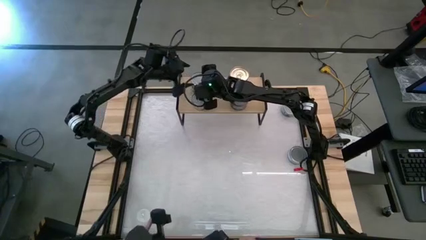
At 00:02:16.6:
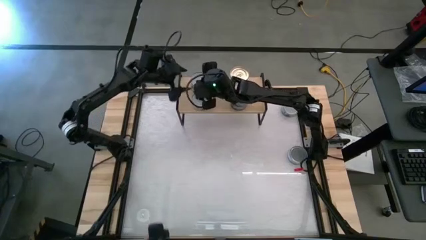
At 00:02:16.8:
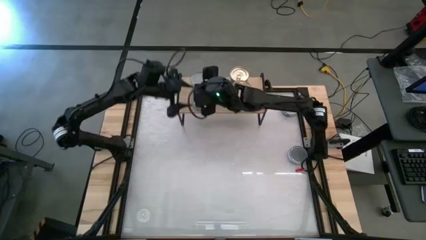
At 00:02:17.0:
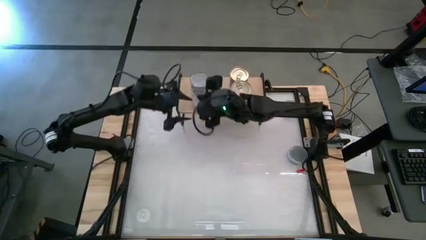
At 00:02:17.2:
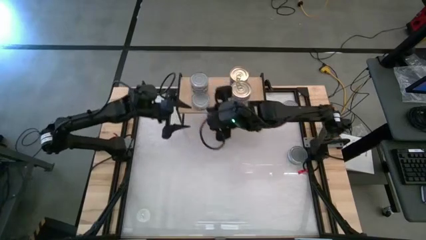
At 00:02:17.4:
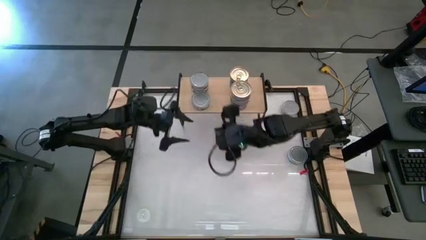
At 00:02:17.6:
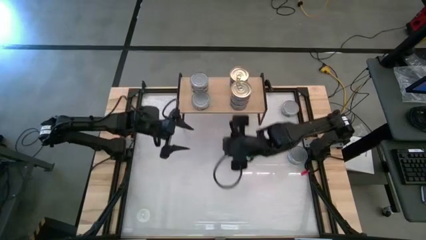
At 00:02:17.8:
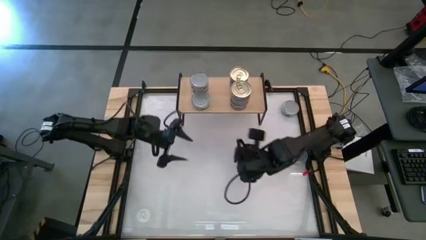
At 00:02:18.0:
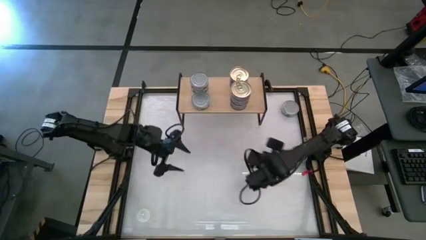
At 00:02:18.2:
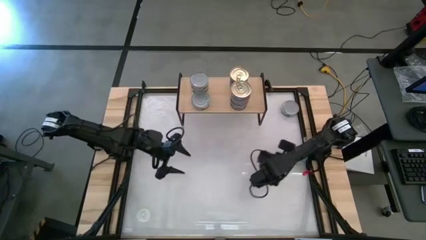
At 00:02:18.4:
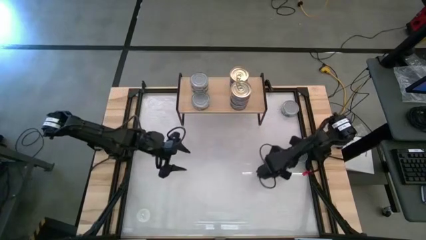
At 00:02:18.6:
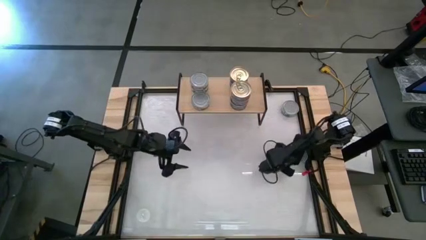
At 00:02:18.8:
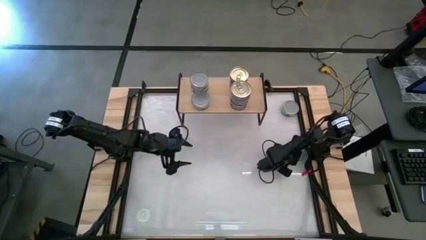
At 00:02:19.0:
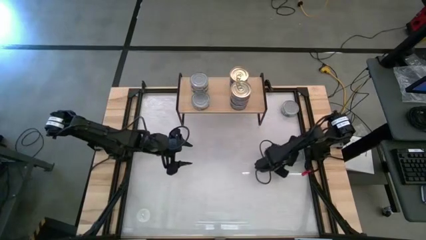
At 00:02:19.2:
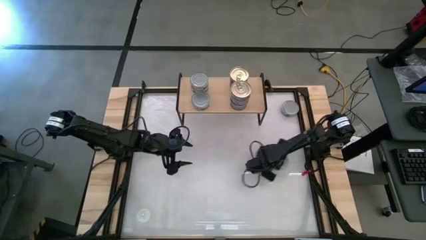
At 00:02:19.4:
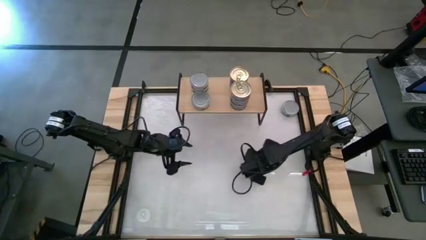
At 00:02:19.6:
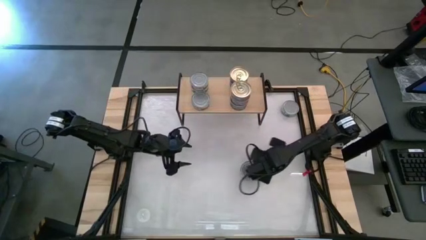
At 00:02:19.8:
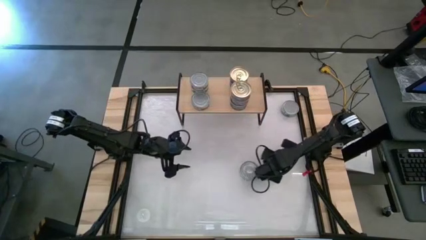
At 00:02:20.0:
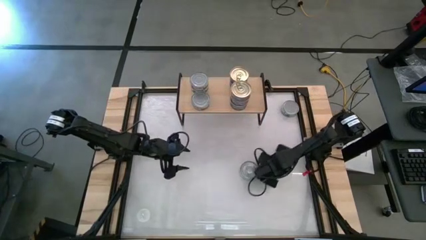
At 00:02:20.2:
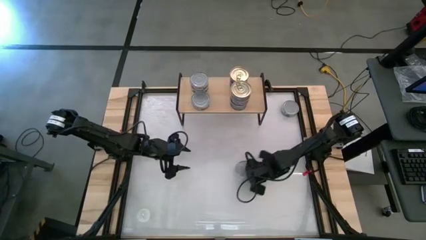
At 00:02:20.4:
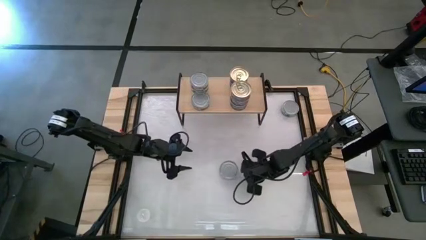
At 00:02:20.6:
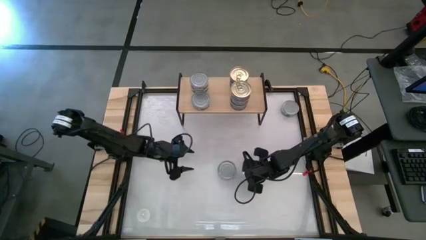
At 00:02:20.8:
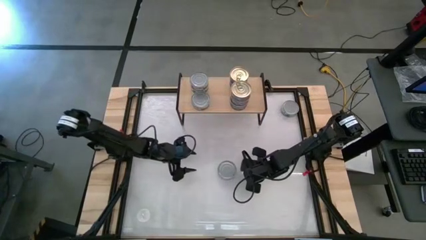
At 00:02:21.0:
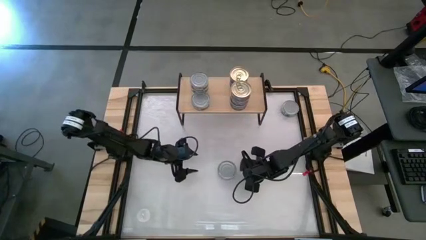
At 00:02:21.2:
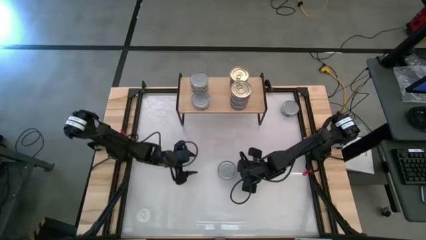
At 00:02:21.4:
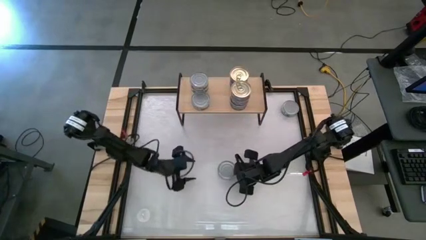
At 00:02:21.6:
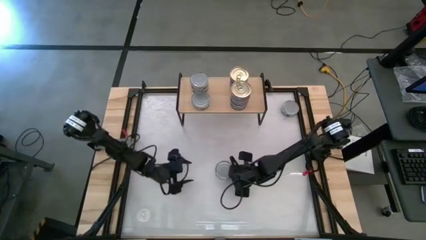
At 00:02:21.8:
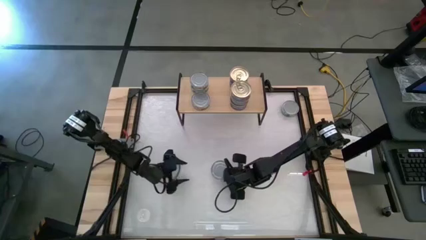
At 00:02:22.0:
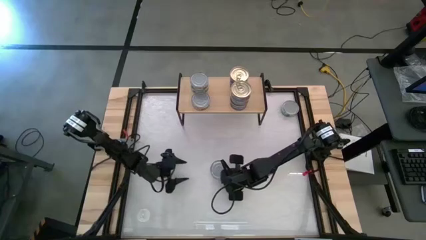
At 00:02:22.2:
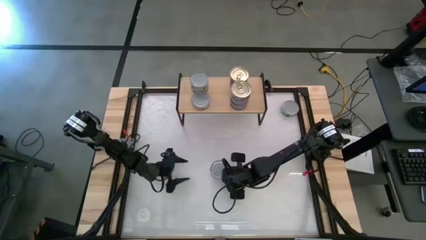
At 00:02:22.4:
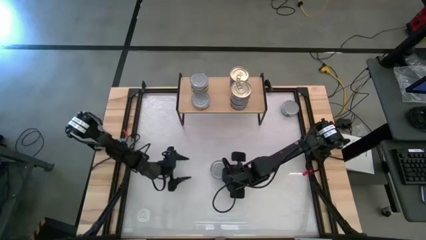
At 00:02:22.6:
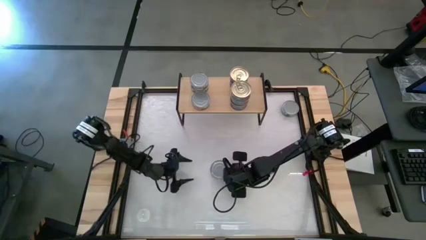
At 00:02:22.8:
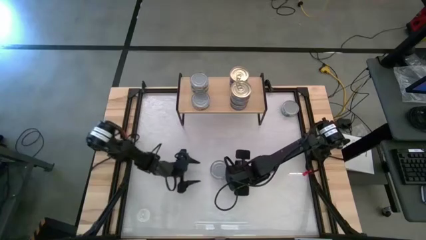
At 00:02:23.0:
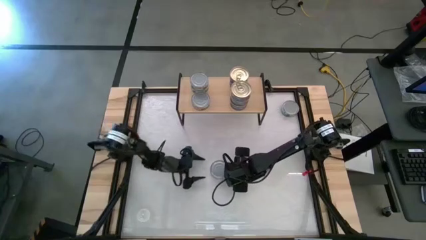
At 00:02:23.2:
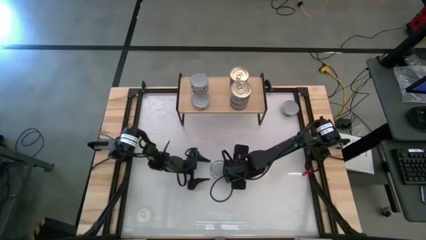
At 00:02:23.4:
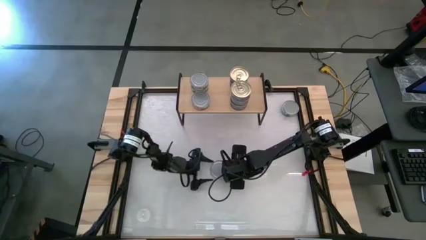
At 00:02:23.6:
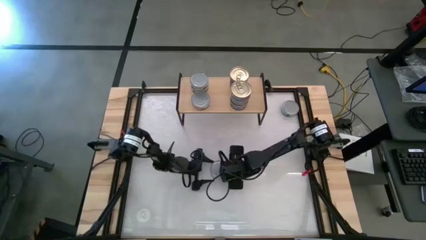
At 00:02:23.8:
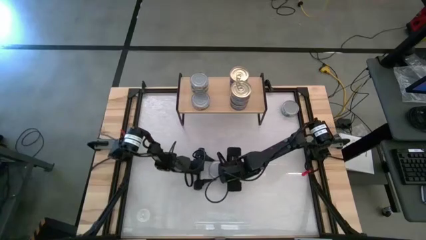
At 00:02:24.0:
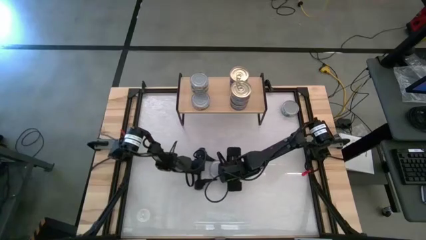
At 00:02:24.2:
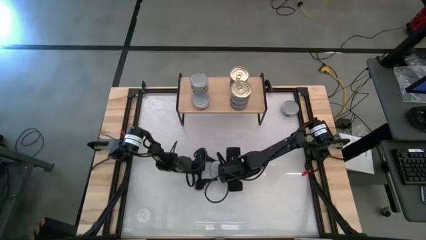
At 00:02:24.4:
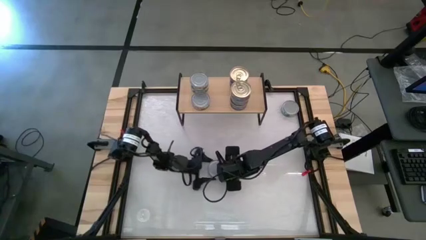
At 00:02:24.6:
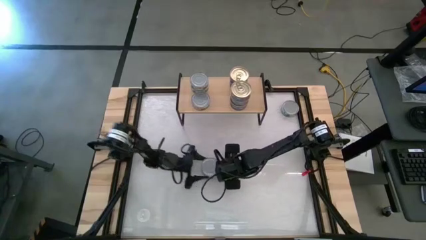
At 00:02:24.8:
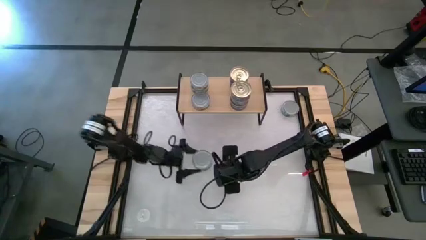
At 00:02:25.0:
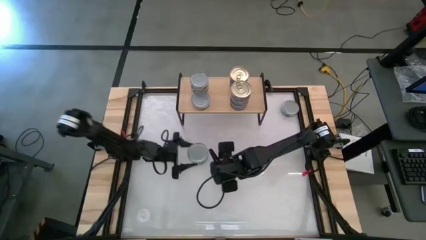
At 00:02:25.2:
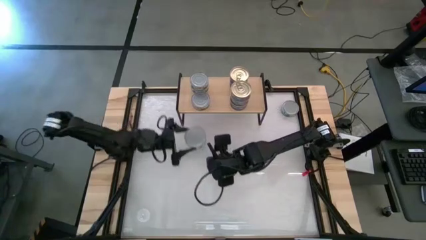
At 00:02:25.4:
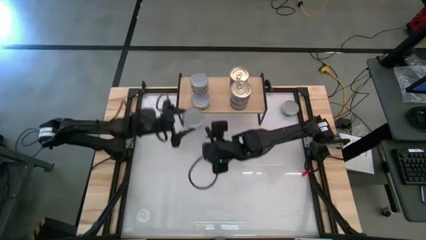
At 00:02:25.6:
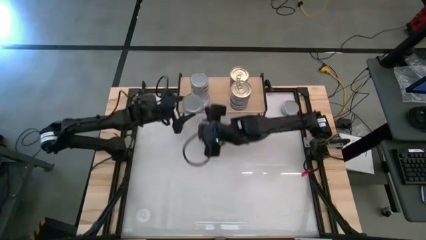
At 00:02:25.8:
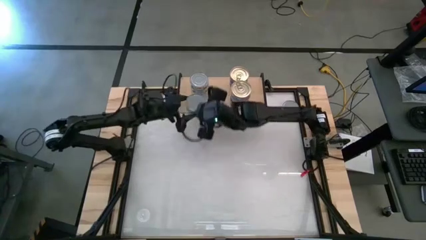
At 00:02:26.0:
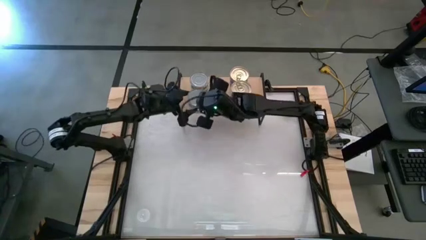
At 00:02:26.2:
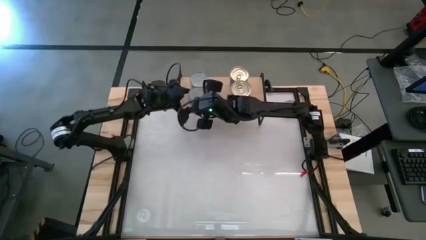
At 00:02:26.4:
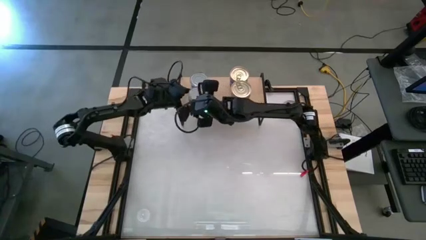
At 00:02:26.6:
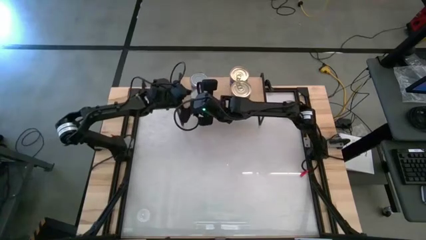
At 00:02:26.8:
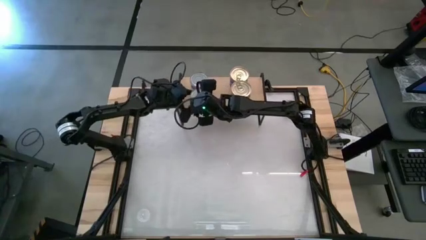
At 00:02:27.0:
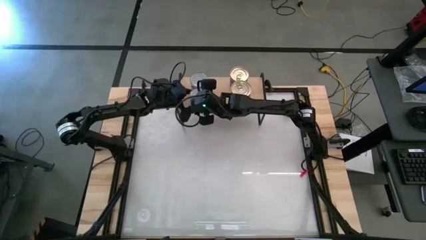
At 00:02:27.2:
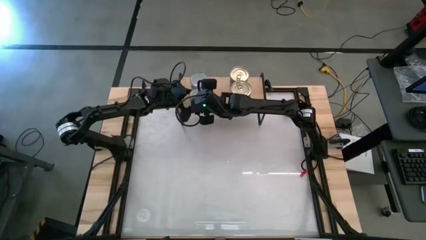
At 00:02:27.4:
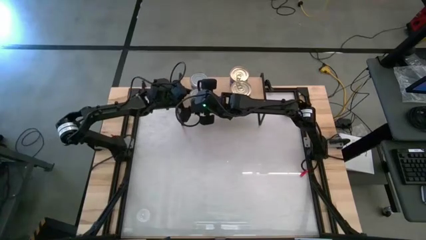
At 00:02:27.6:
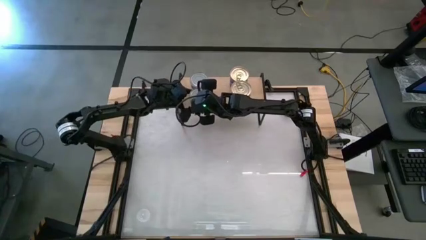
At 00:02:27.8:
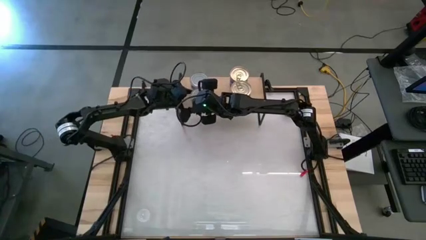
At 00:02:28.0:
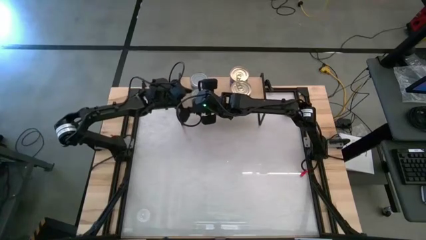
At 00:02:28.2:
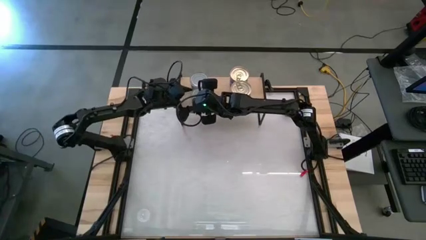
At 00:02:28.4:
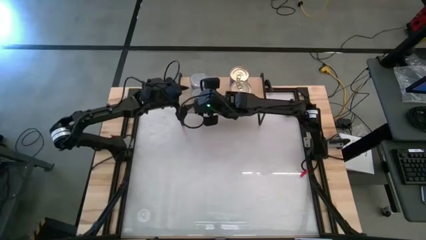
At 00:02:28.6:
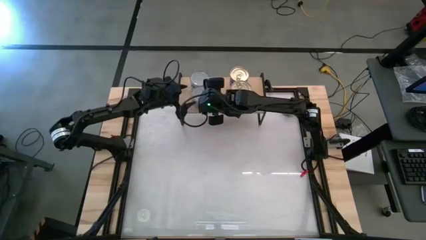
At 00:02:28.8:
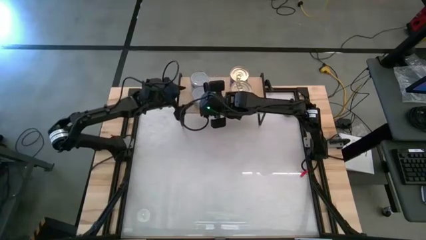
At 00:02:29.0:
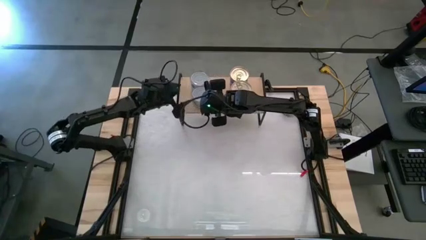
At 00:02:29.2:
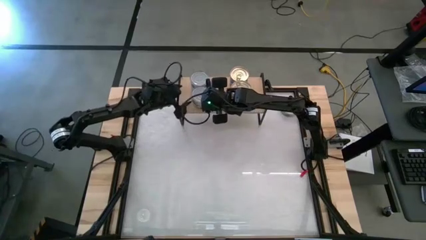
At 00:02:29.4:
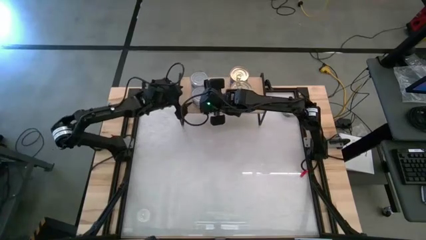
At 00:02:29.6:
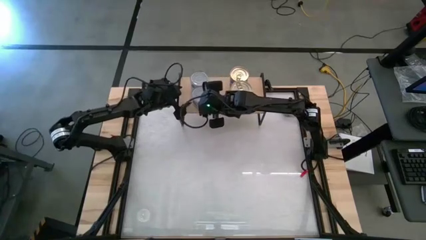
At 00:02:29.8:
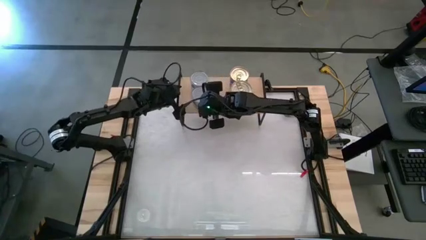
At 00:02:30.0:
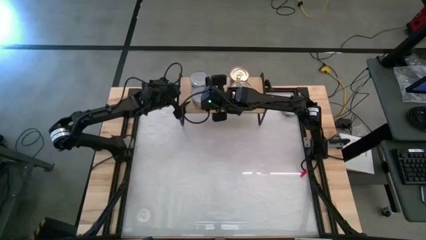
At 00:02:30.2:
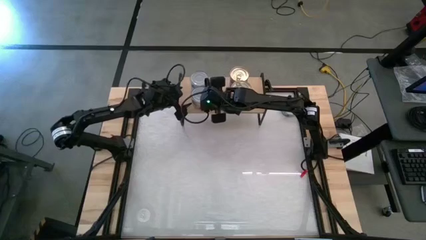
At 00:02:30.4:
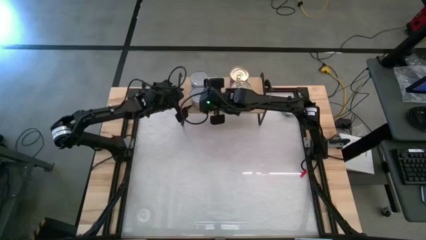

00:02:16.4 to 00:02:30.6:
Task: Stack canned seafood by type on shelf
Stack the green tuna can on top of the other green tuna can on the shelf

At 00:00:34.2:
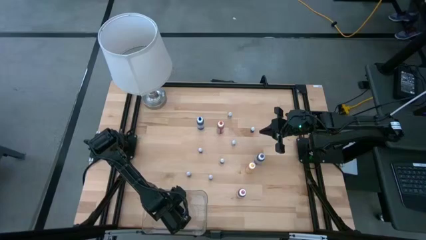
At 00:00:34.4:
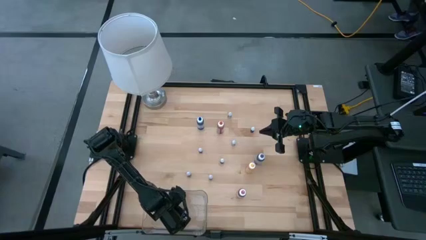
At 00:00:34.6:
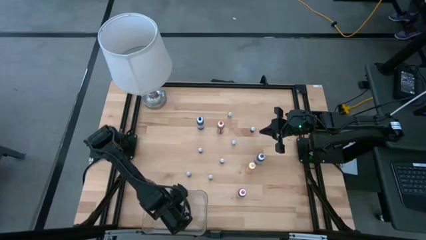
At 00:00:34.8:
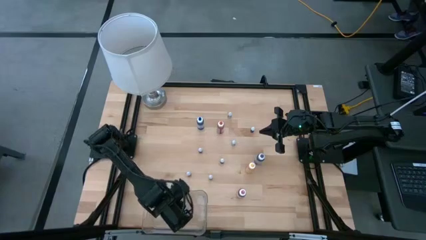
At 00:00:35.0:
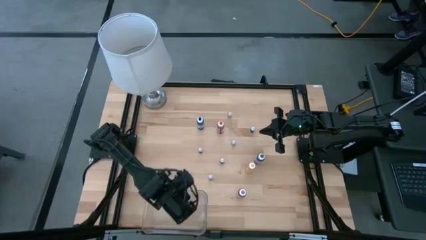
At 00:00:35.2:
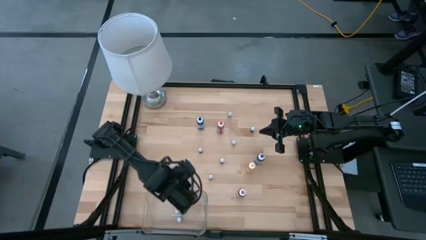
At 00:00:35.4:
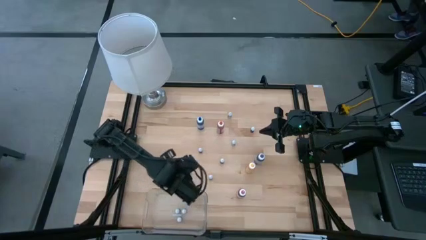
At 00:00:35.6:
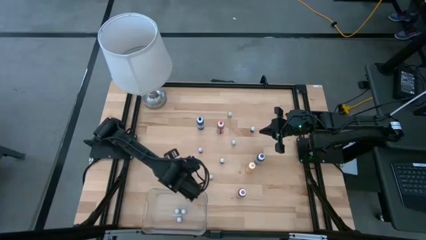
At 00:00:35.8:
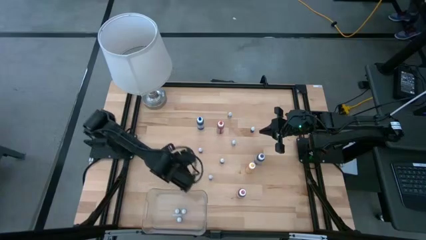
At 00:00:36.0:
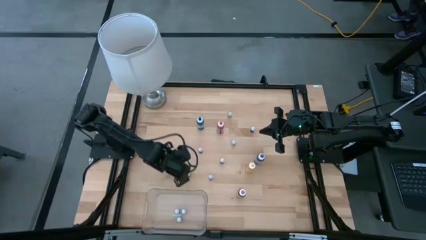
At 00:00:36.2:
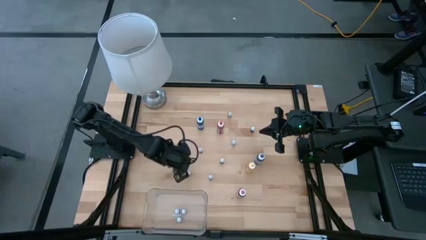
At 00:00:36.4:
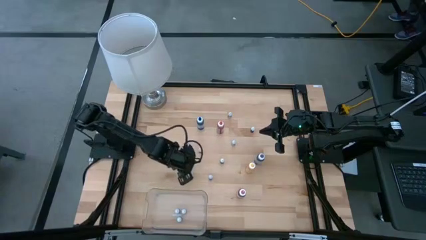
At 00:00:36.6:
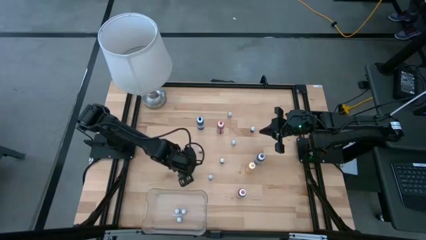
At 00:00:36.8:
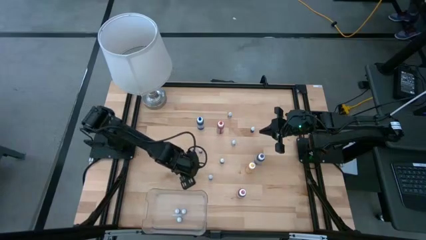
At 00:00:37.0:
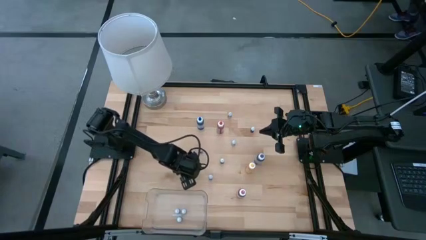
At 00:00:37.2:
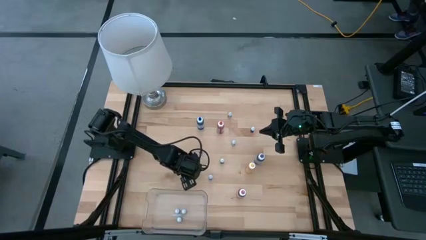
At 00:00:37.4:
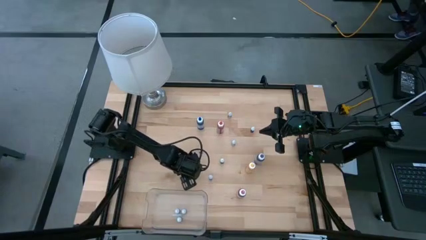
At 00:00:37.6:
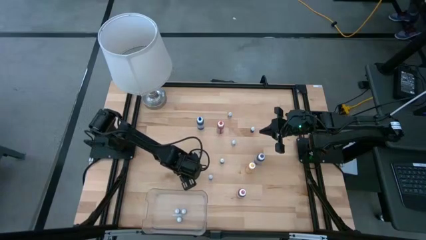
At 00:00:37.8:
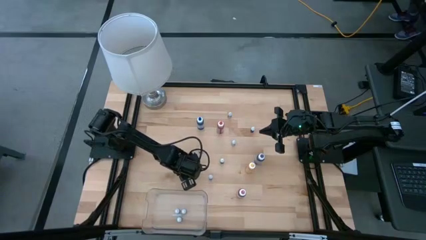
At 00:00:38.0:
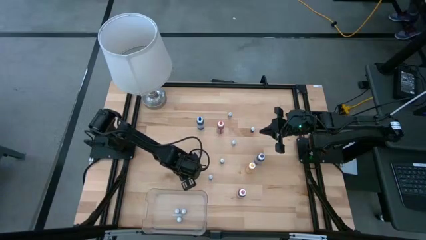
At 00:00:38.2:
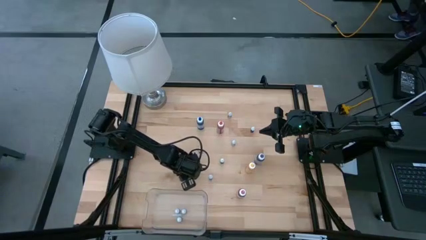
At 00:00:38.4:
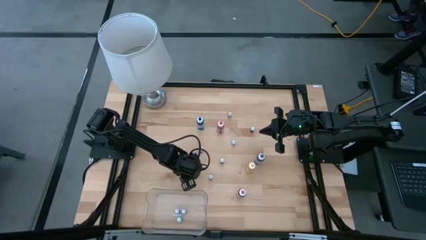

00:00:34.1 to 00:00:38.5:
Task: Pick & Place food coloring
Put the bottom small blue food coloring bottle into the bin
